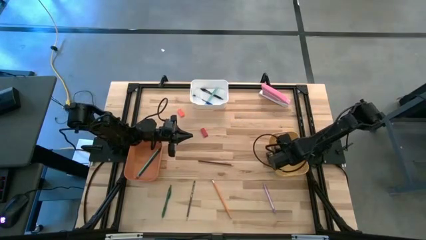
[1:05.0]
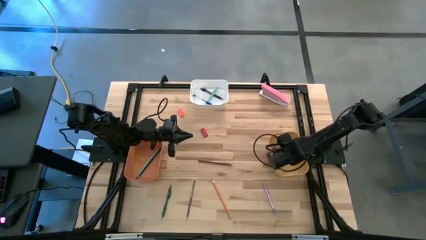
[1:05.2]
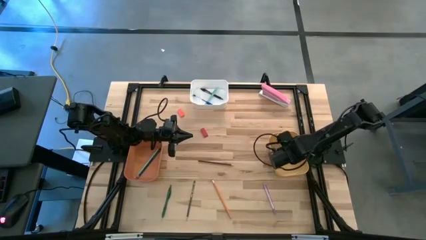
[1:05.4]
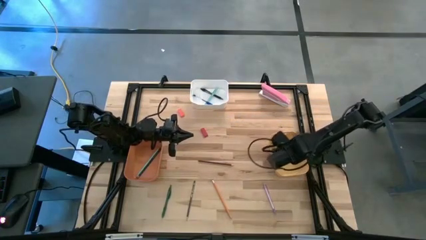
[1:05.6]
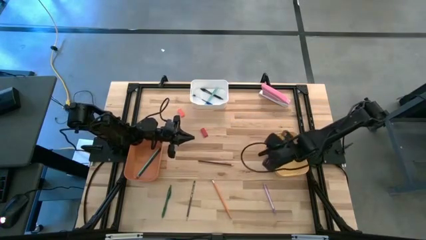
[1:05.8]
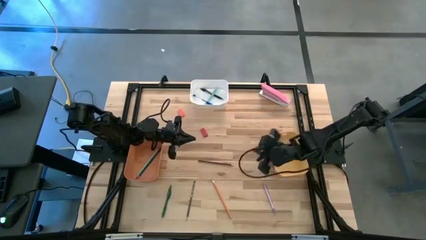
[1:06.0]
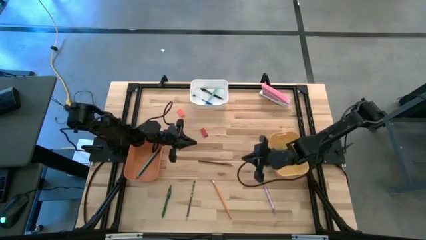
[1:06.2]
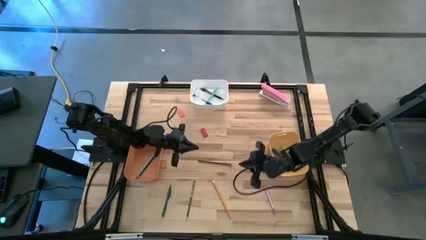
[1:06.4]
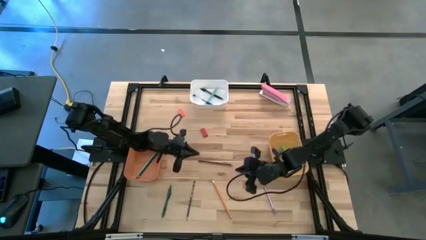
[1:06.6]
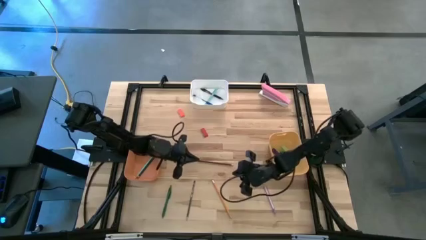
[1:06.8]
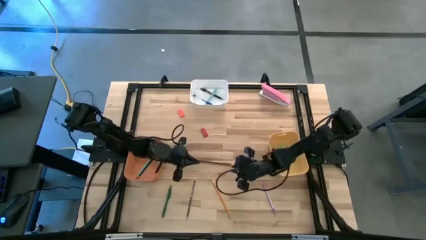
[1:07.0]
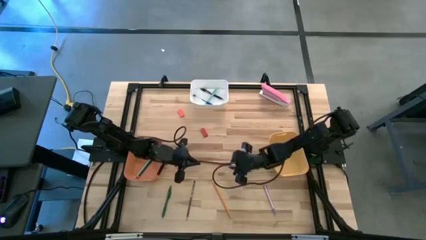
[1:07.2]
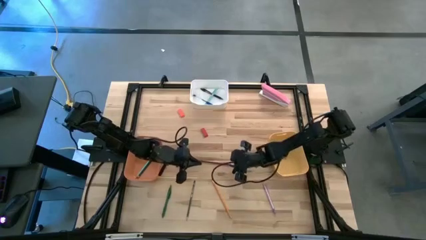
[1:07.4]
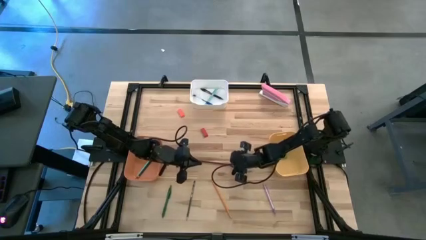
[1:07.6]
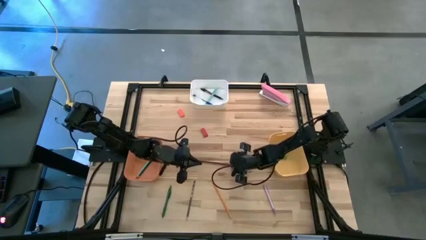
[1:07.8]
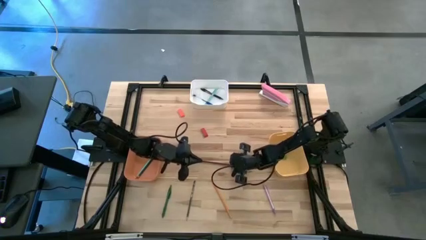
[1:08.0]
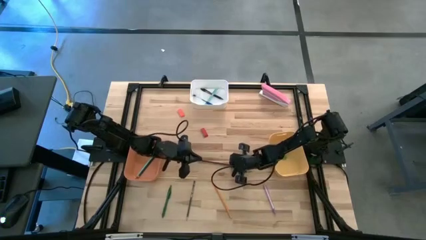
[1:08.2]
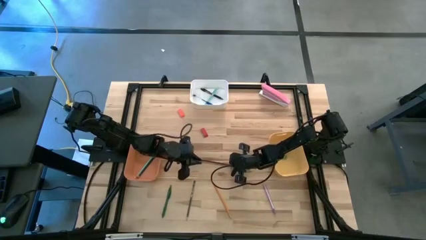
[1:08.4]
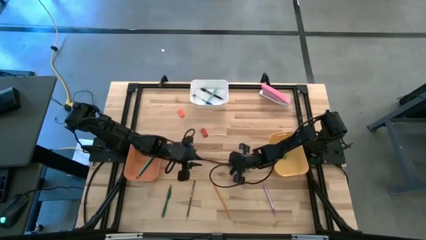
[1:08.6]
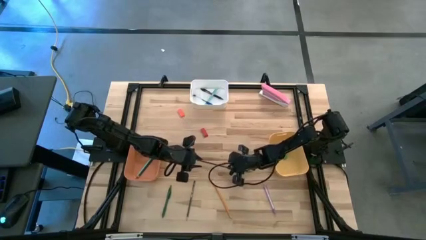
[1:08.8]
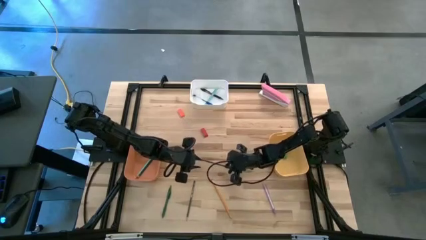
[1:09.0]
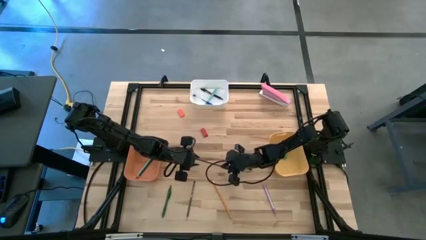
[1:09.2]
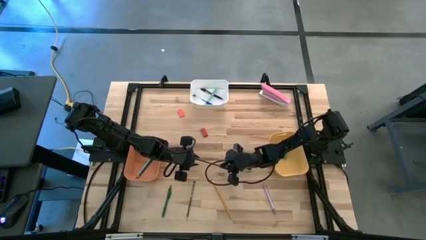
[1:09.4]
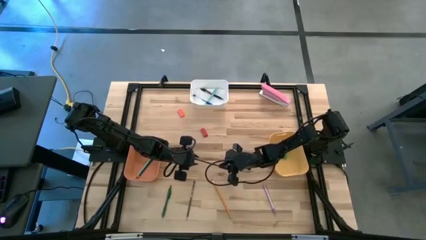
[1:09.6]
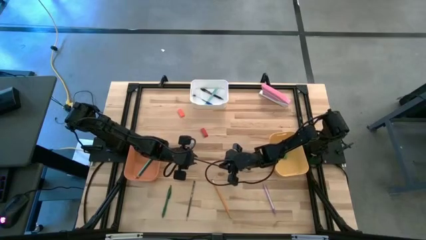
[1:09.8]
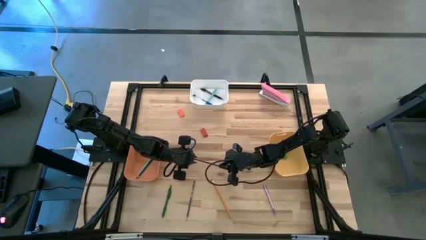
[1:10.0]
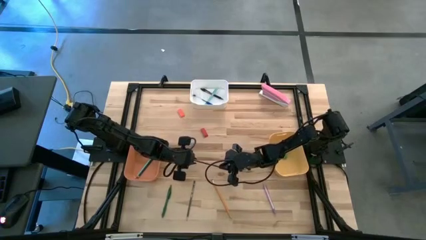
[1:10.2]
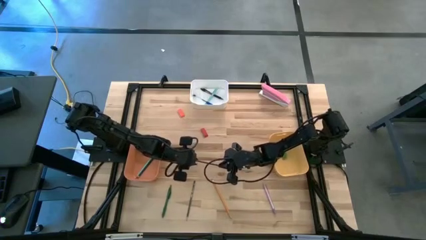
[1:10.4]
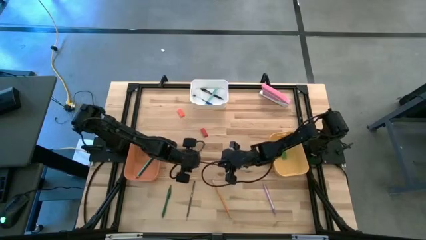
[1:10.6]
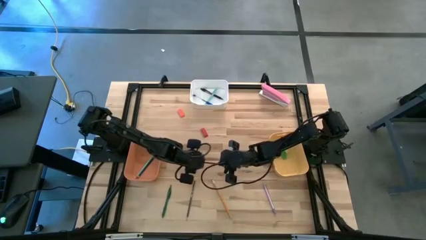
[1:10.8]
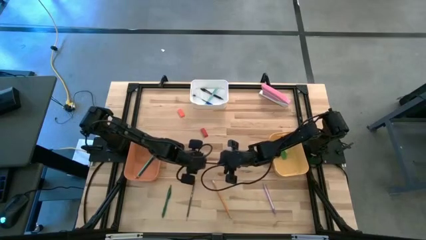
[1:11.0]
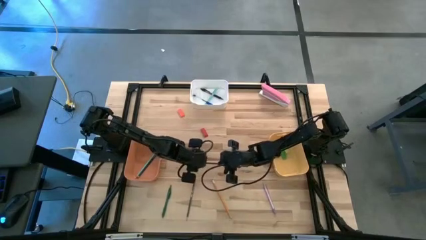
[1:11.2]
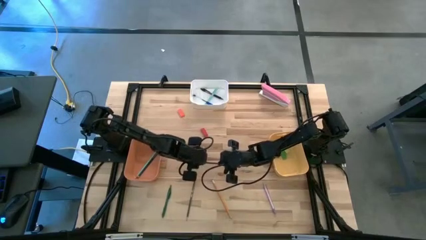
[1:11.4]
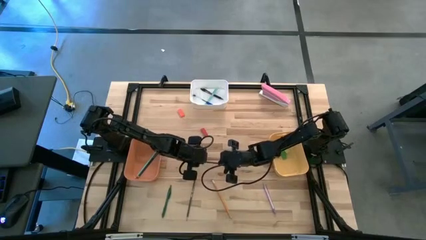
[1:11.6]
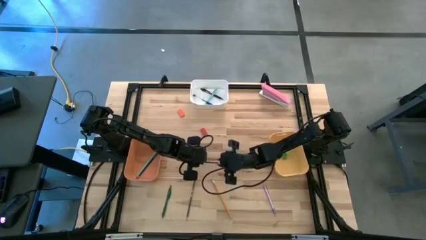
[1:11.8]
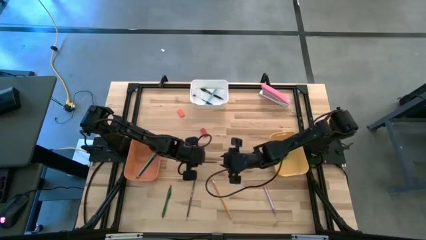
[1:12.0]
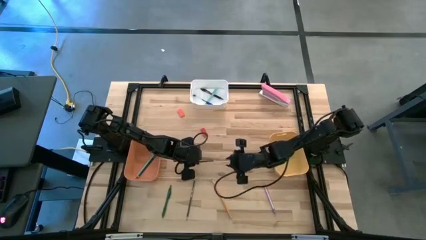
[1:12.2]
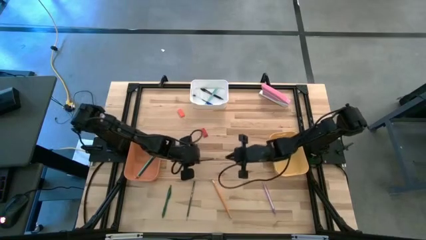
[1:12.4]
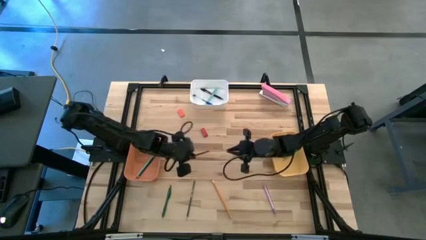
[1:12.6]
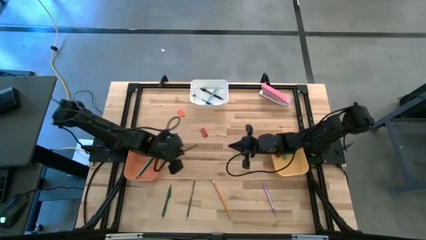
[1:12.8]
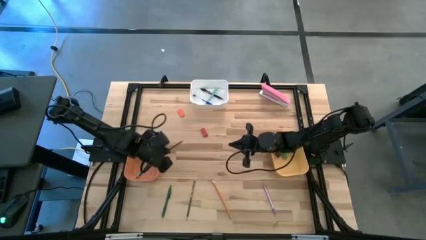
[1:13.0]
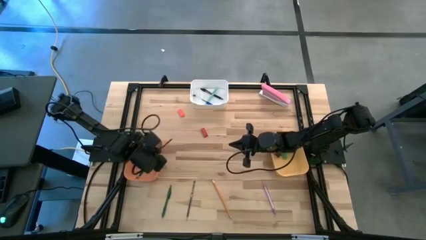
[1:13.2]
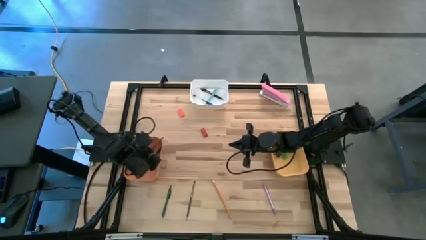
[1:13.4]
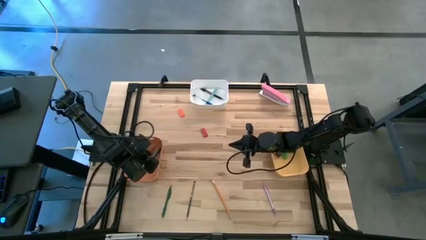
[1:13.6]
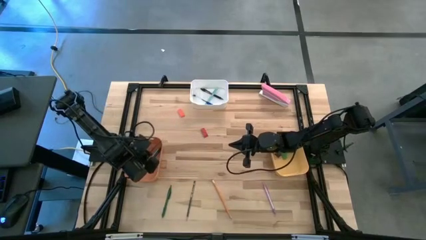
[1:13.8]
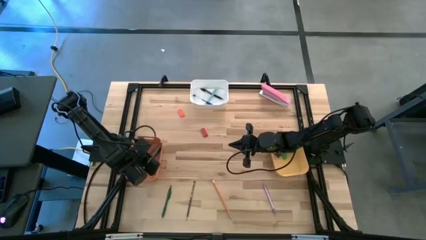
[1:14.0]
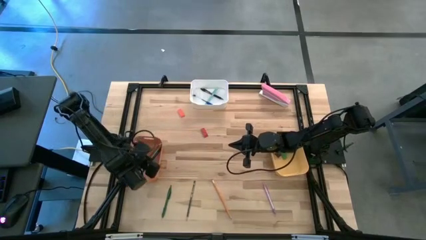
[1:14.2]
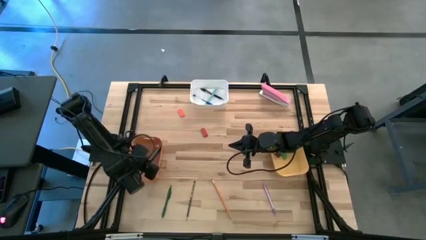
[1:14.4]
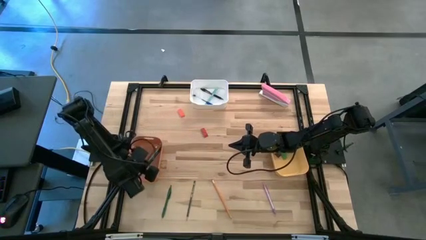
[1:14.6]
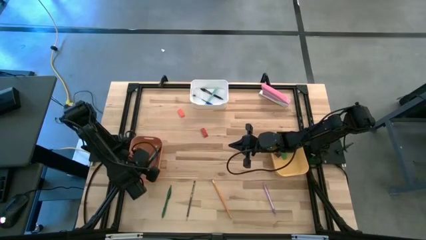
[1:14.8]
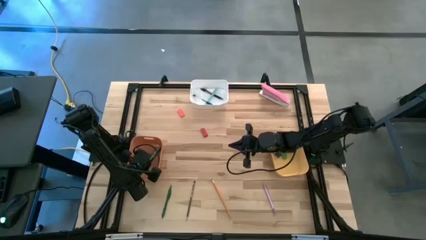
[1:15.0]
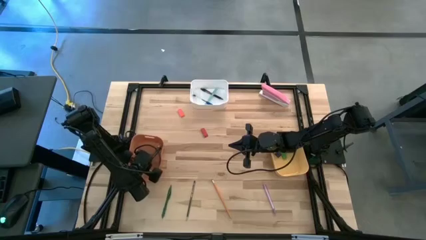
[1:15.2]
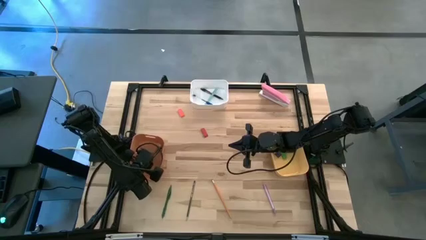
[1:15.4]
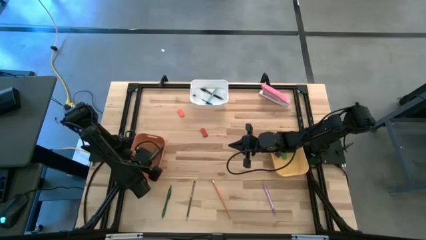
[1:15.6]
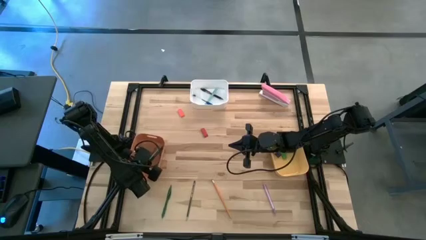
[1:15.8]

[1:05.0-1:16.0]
Task: Sort crayons/erasers/pens/pencils in bins
Put the brown pencil into the orange bin

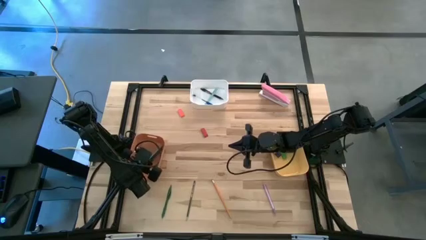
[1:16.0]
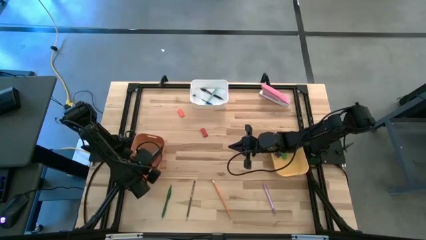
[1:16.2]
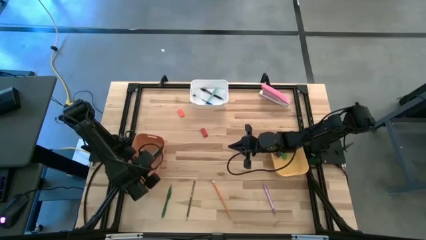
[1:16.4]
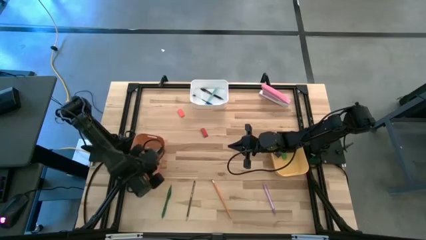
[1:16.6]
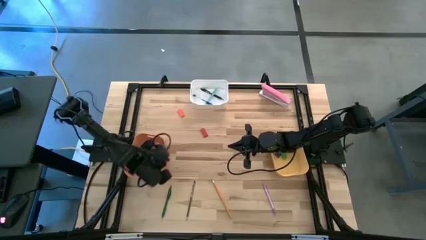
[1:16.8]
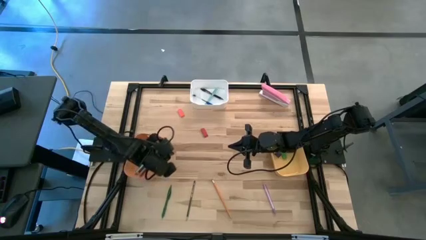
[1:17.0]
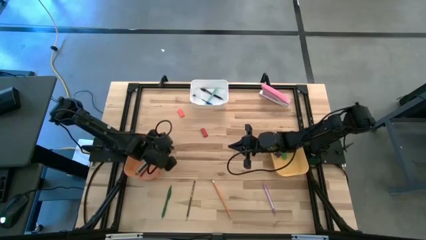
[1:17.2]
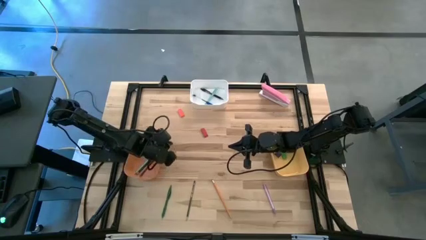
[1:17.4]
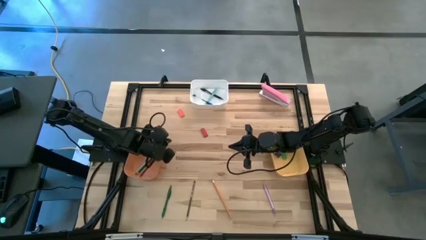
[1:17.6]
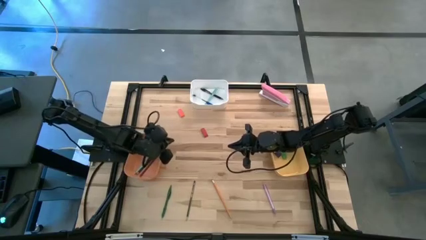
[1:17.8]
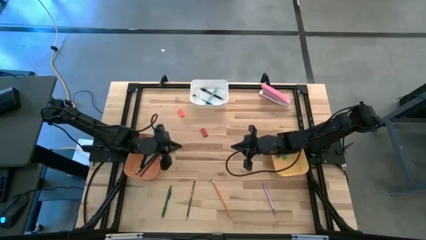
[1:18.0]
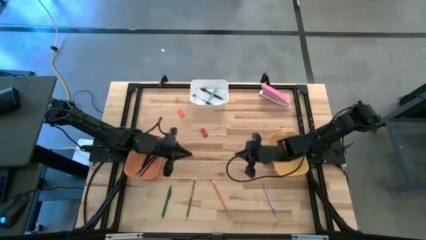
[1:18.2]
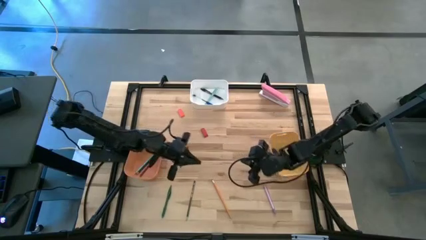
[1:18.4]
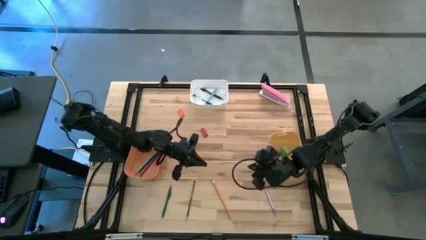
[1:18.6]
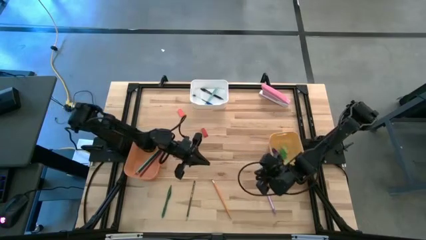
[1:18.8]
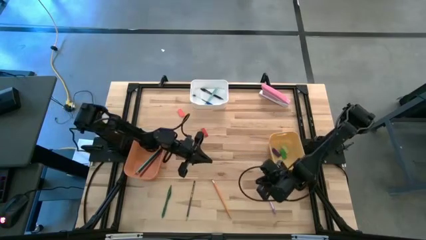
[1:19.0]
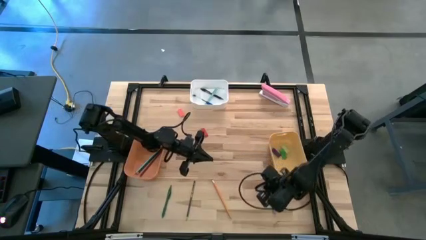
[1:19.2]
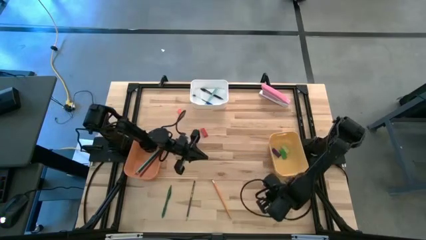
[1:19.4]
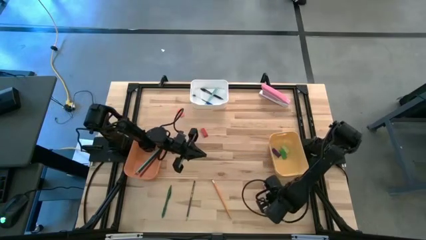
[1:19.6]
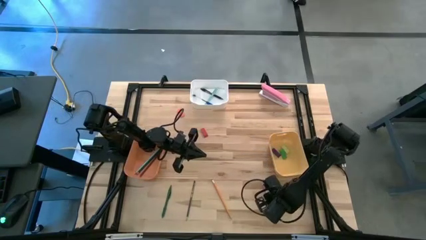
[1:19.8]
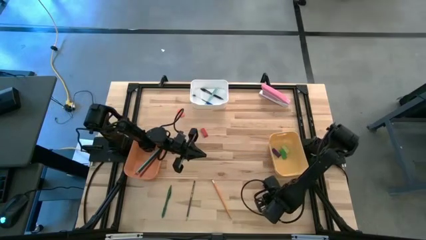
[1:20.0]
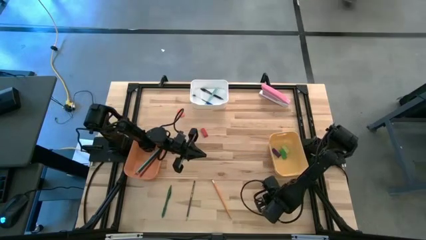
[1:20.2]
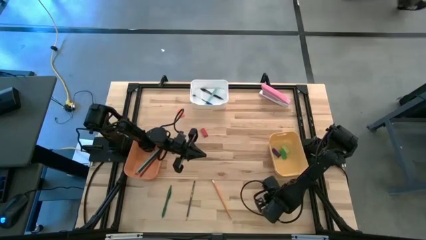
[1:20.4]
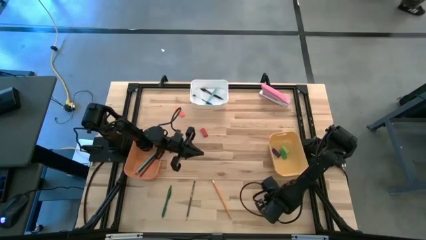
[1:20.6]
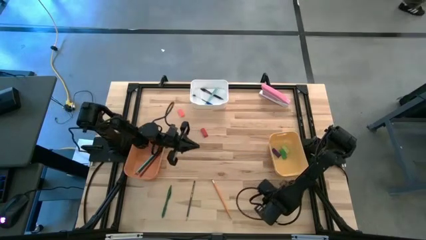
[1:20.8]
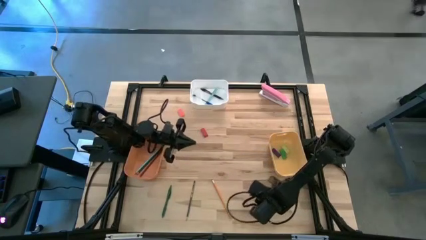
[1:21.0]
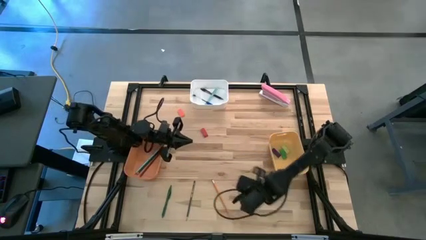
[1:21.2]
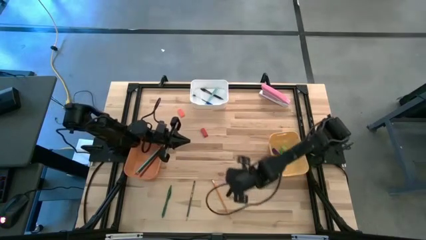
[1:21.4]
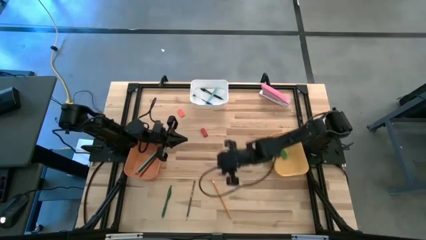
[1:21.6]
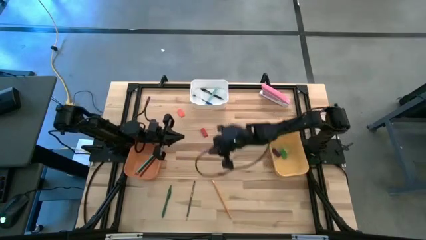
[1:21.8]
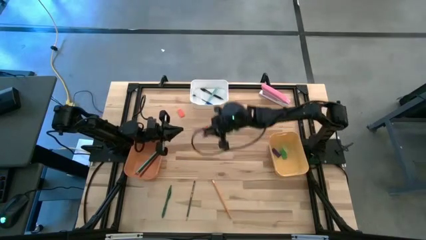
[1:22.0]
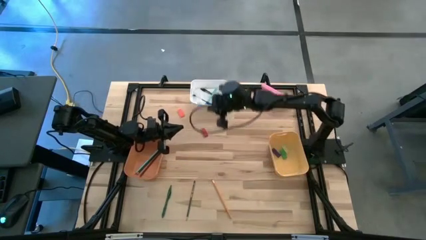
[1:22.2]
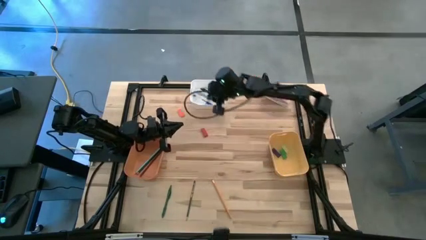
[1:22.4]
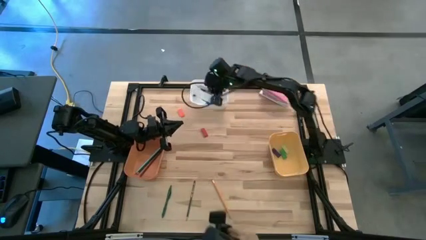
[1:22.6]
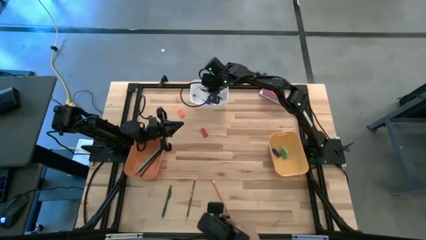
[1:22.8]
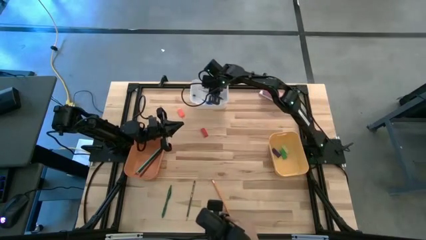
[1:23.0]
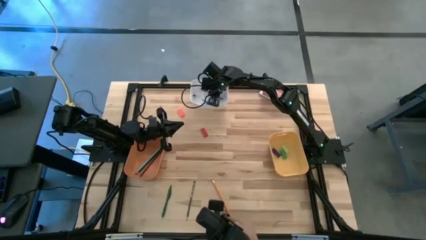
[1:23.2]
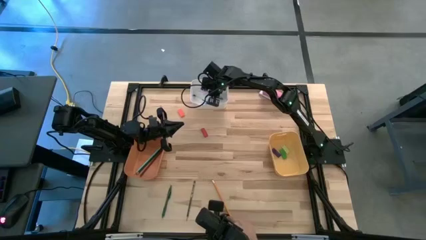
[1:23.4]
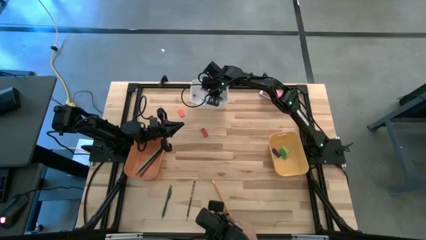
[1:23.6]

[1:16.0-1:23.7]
Put the pink pen into the white bin
